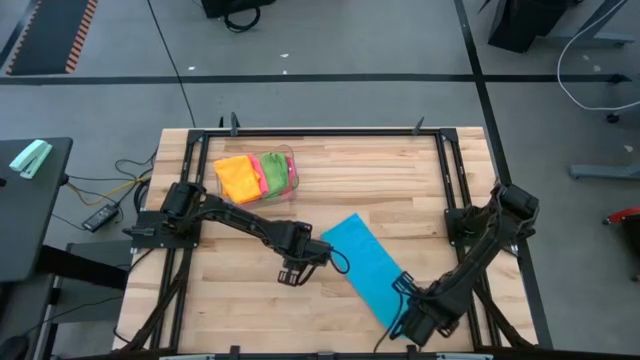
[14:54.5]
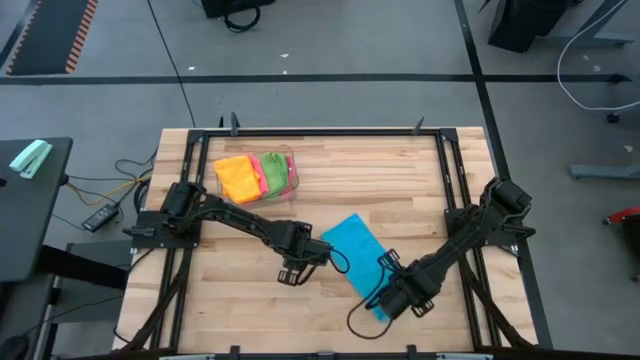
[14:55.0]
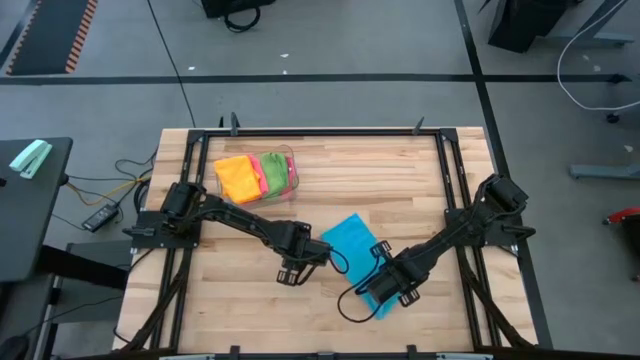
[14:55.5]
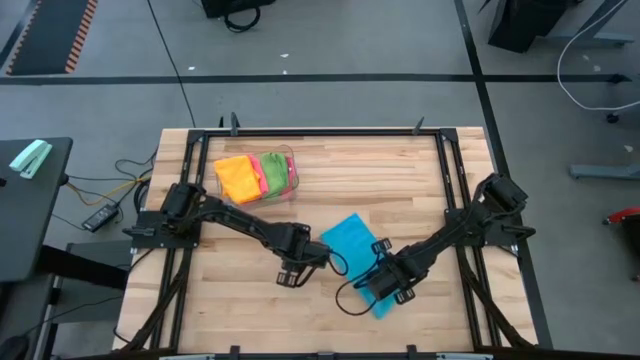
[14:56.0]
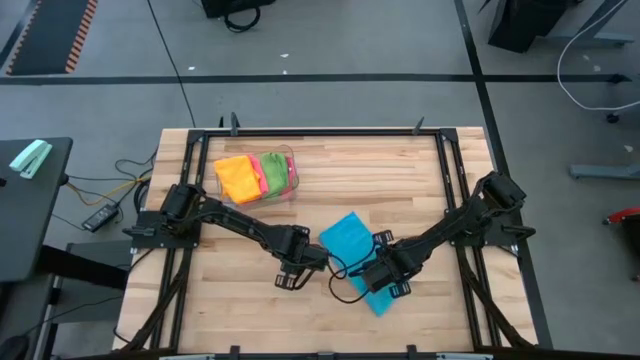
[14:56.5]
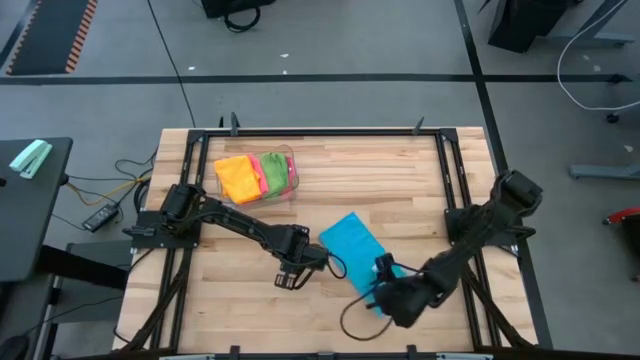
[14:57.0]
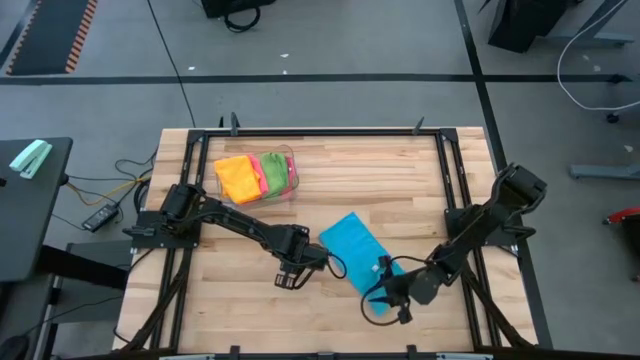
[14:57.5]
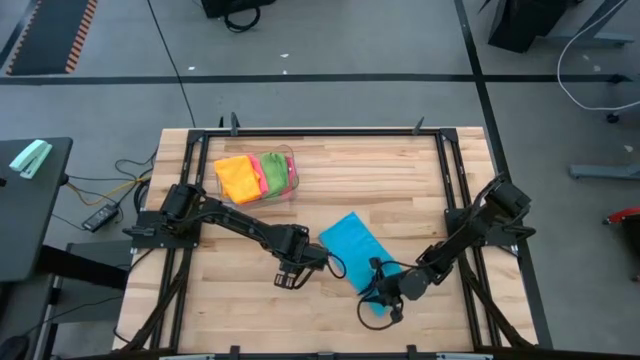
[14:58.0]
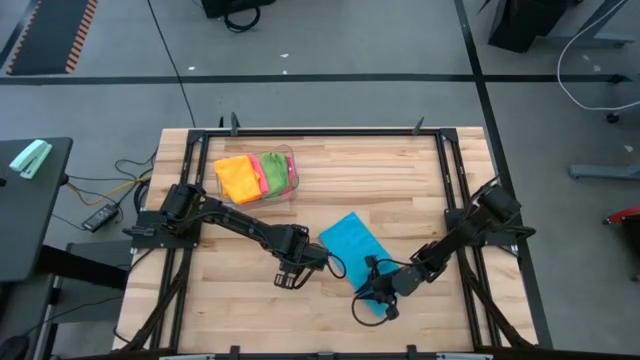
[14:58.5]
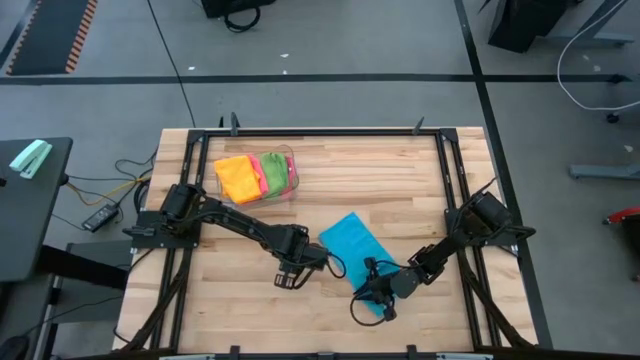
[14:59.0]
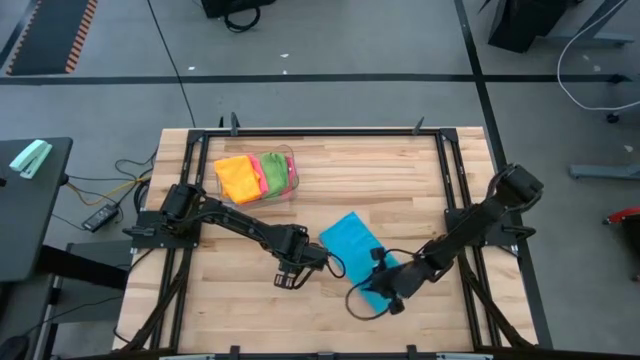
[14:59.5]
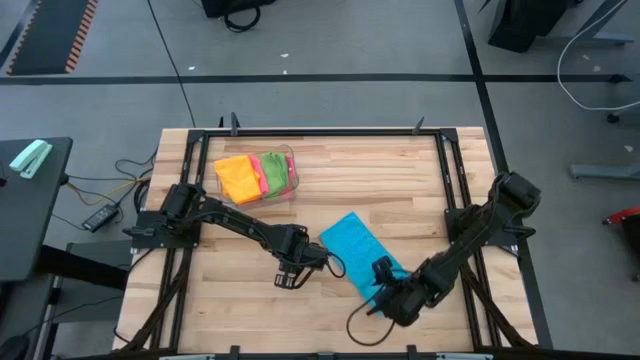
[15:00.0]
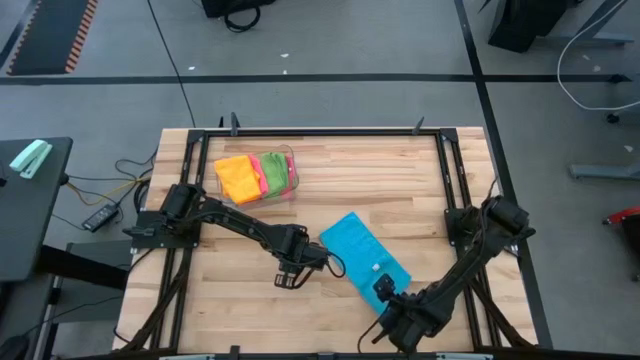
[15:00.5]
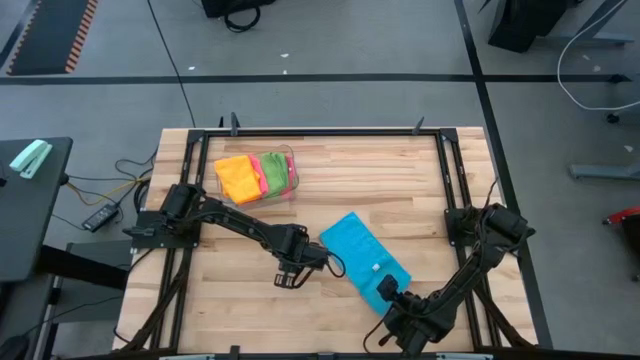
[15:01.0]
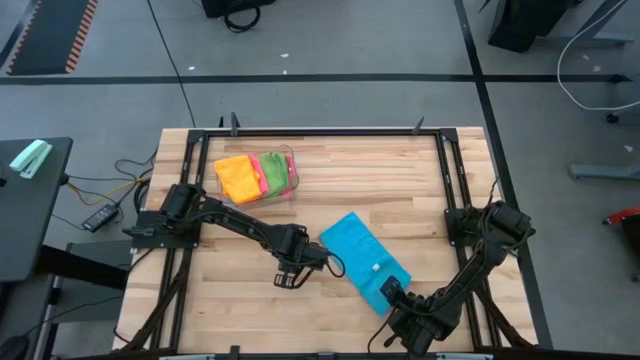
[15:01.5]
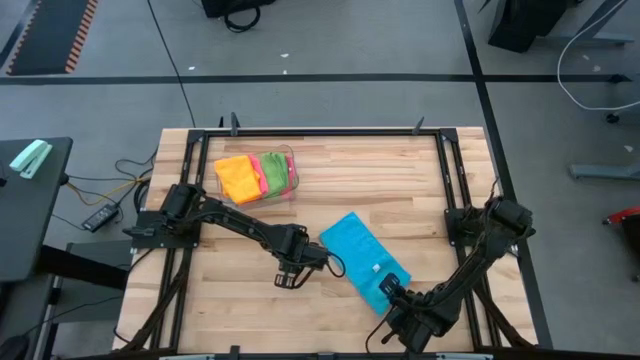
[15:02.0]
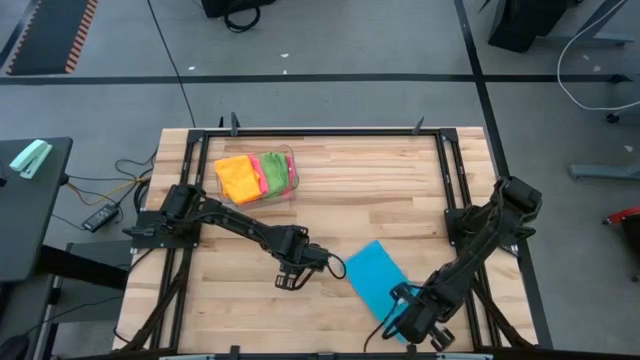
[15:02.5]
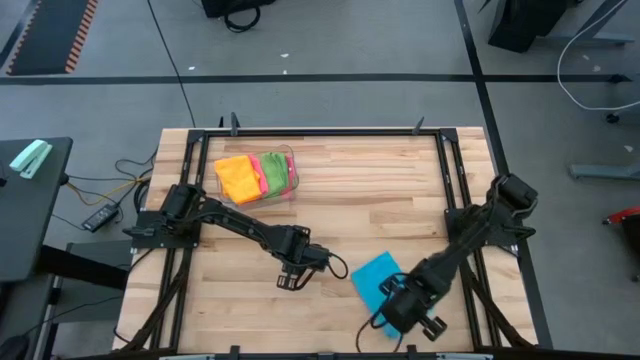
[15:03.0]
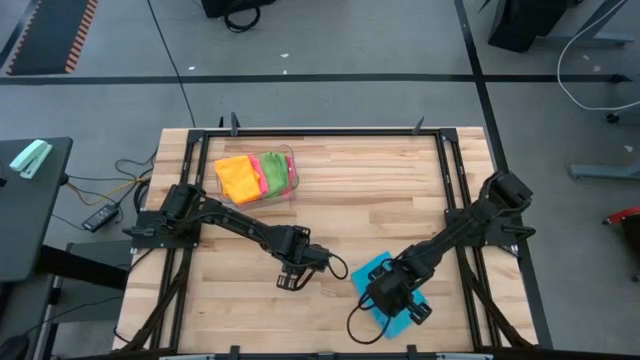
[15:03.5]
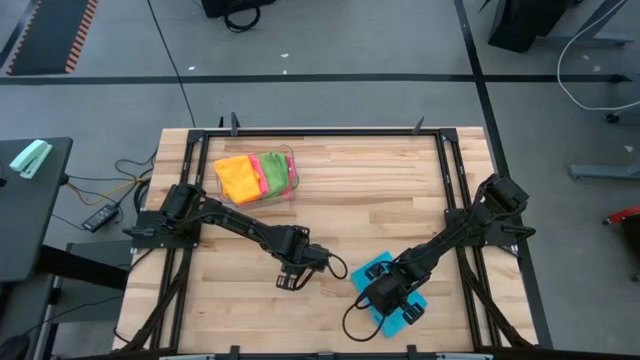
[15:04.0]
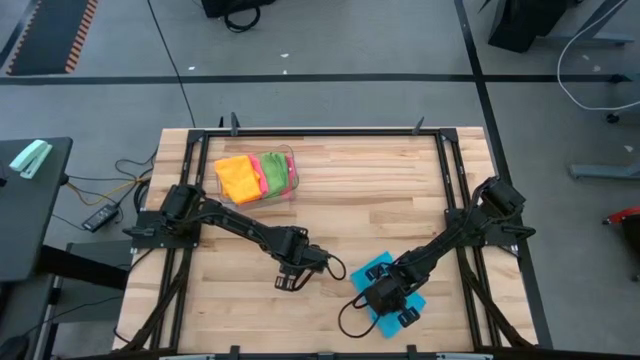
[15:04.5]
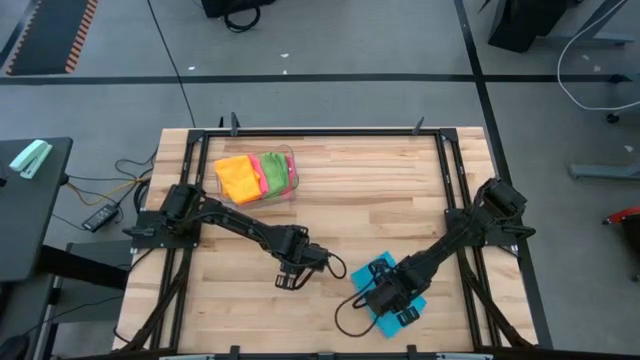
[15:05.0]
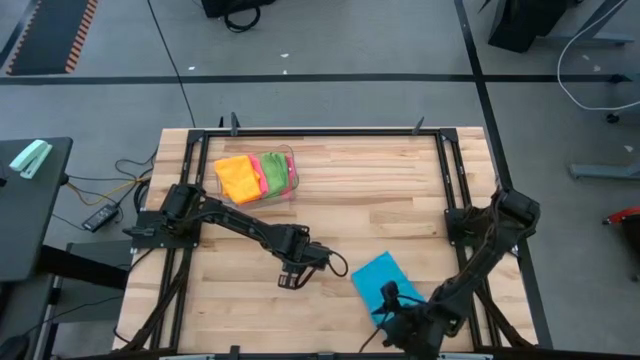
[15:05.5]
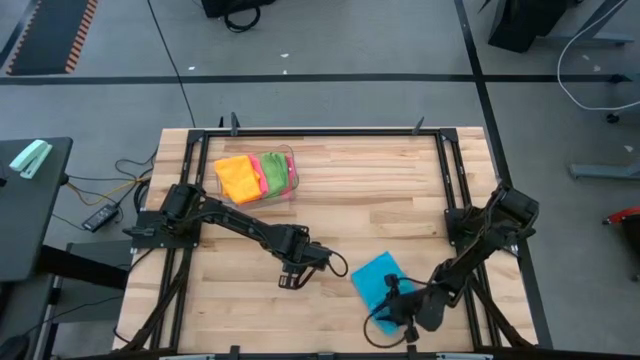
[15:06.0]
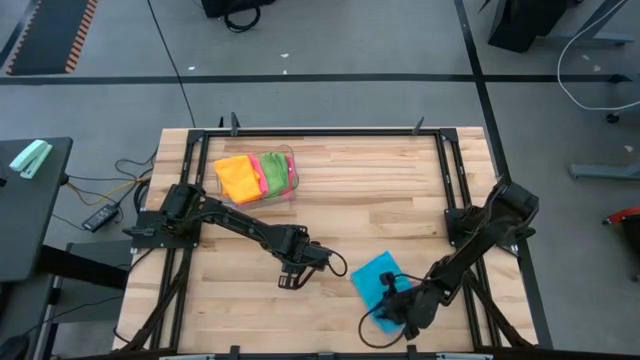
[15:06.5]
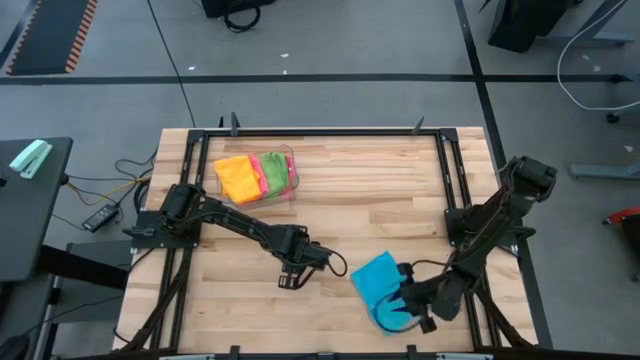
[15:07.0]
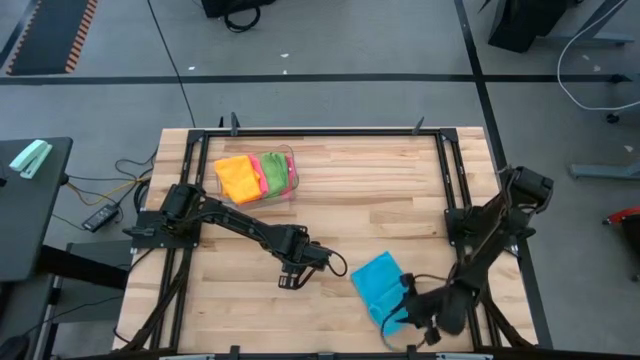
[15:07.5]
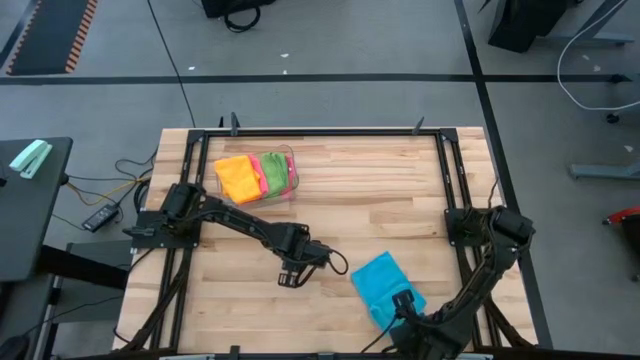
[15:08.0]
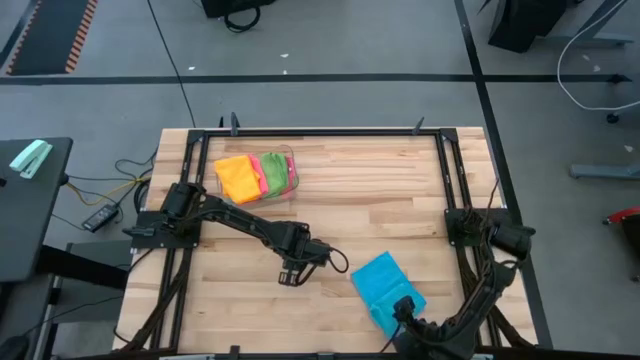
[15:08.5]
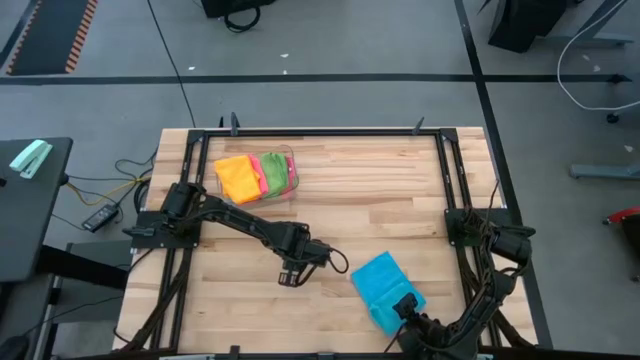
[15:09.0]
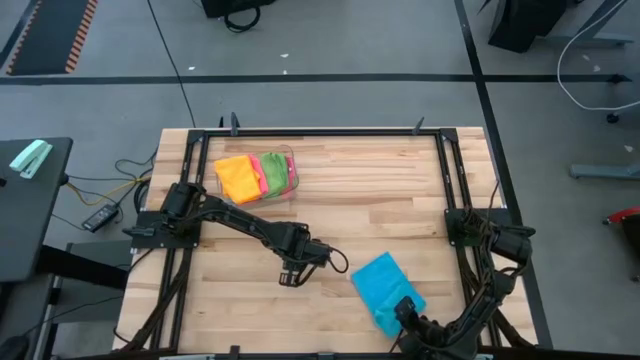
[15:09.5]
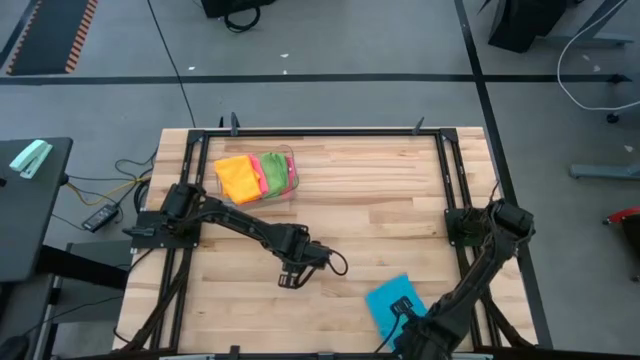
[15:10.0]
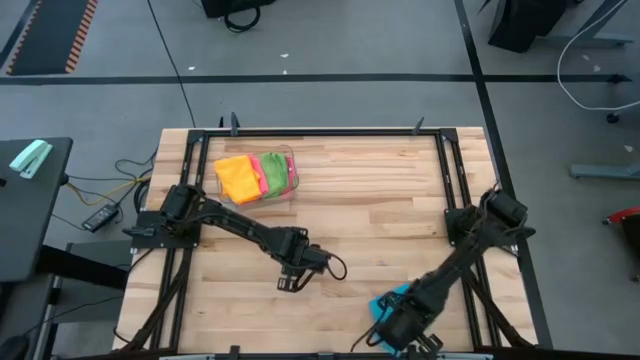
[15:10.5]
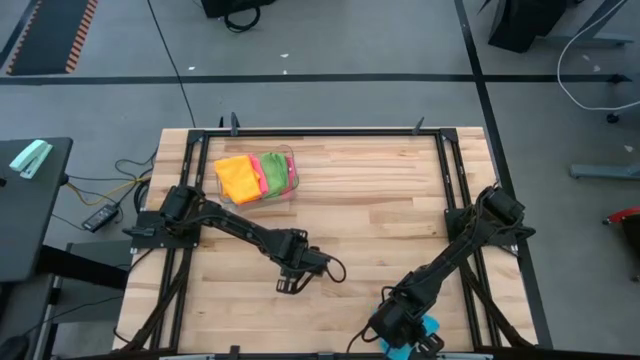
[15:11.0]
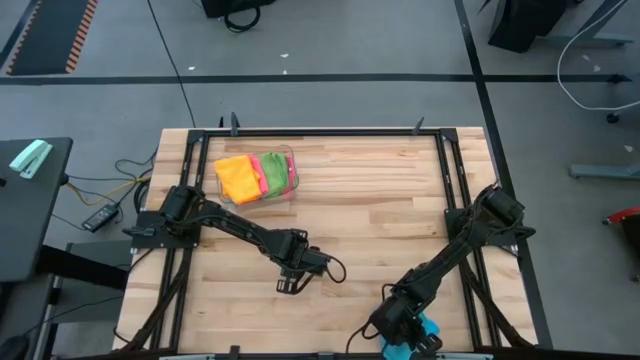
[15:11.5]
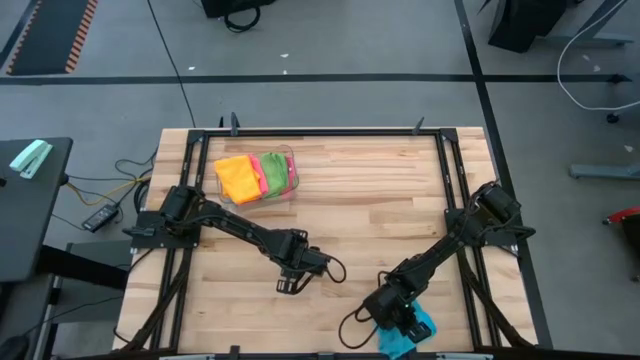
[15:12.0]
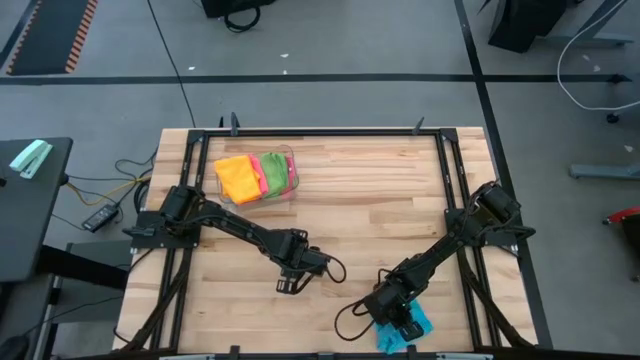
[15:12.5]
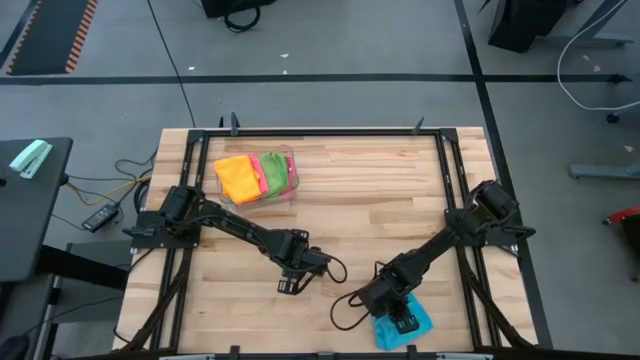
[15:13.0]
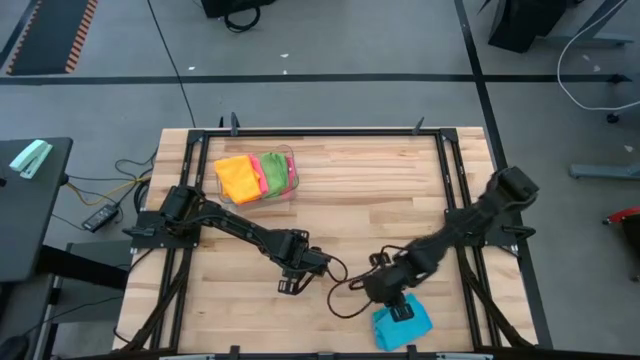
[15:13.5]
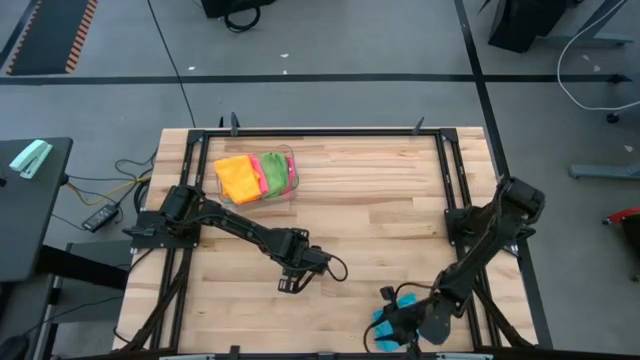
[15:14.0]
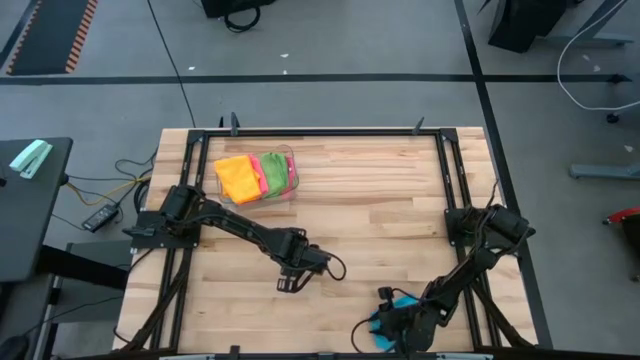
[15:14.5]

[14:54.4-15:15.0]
Task: Fold microfiber towels
Fold the blue microfiber towel
